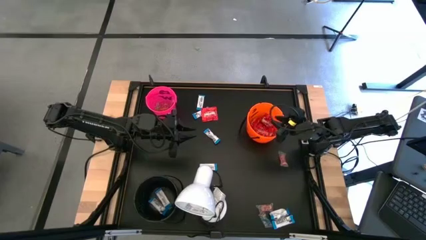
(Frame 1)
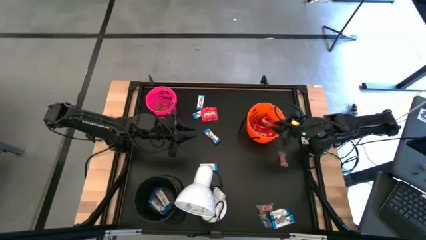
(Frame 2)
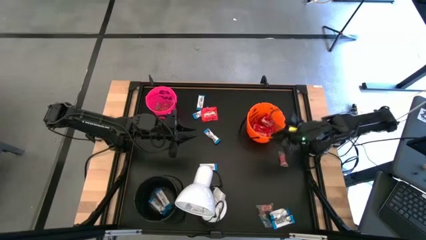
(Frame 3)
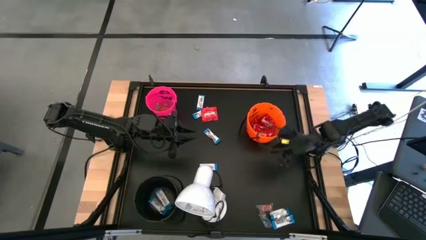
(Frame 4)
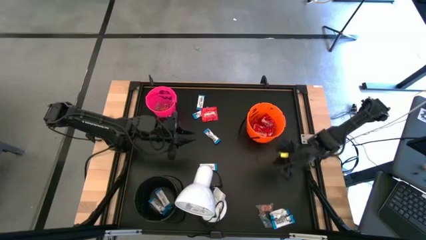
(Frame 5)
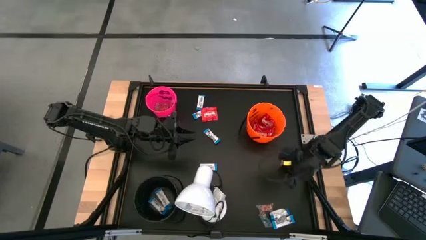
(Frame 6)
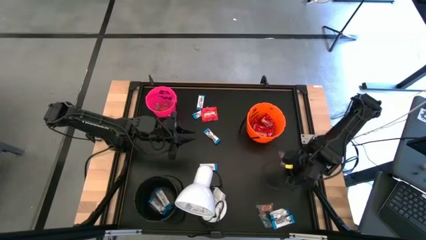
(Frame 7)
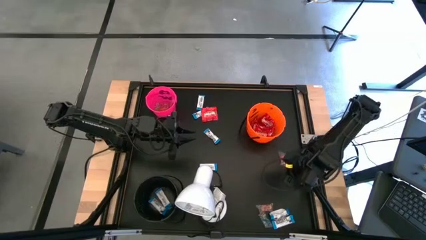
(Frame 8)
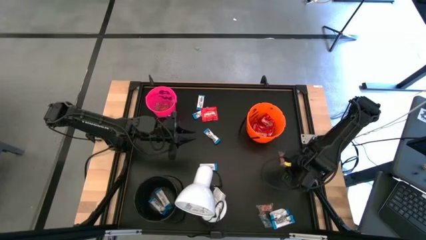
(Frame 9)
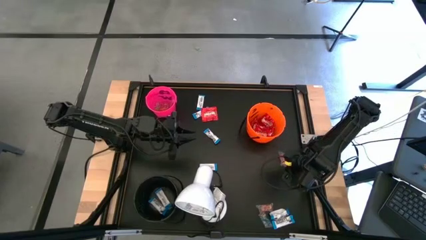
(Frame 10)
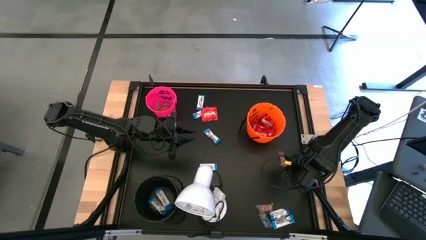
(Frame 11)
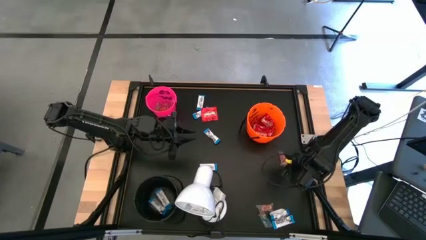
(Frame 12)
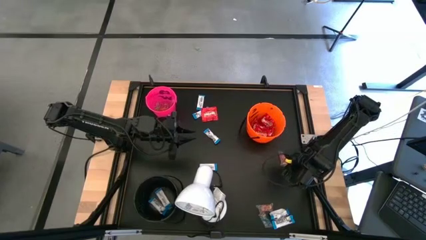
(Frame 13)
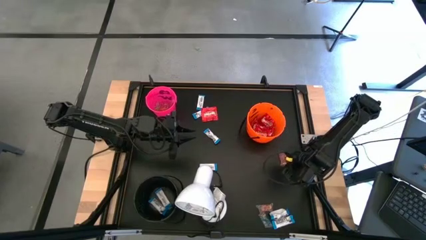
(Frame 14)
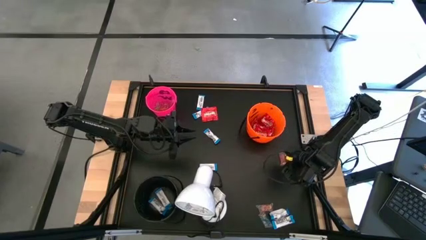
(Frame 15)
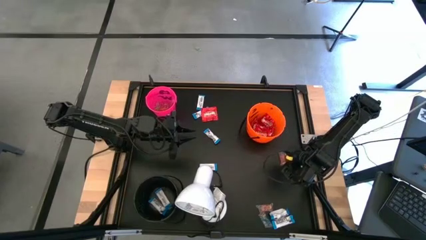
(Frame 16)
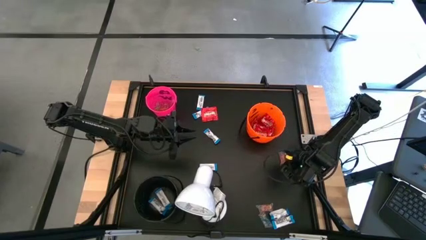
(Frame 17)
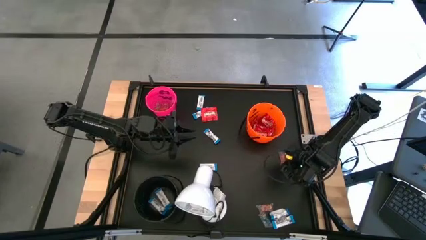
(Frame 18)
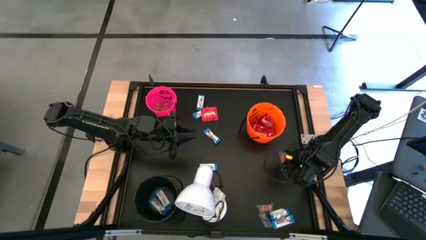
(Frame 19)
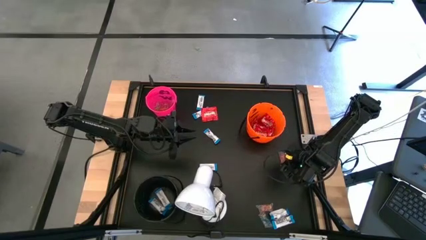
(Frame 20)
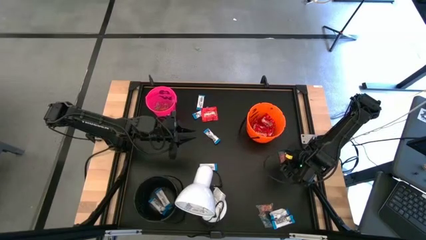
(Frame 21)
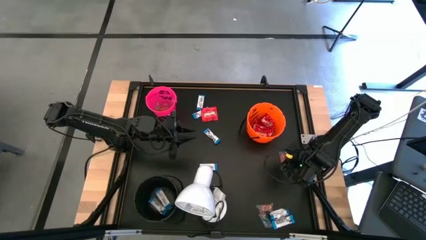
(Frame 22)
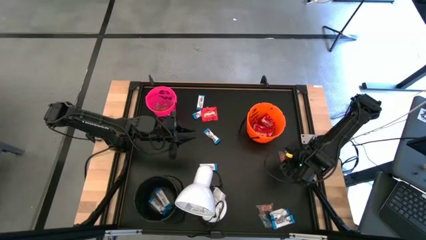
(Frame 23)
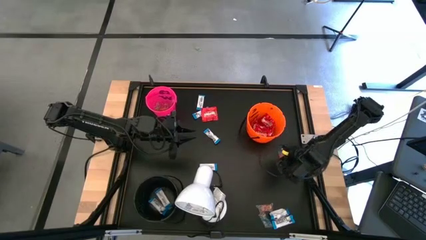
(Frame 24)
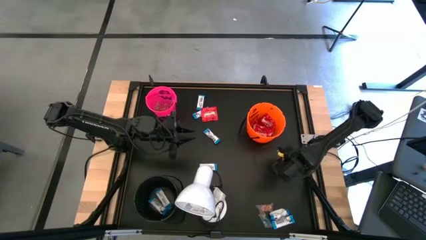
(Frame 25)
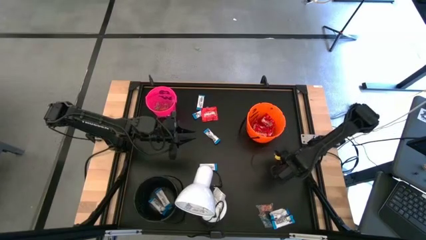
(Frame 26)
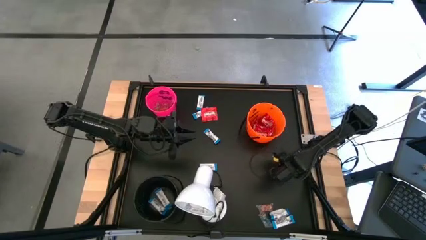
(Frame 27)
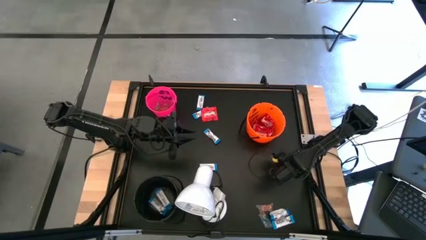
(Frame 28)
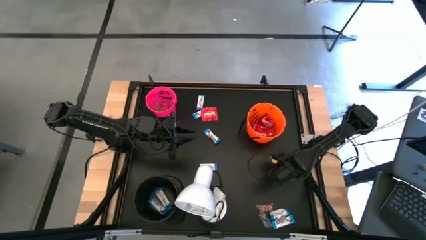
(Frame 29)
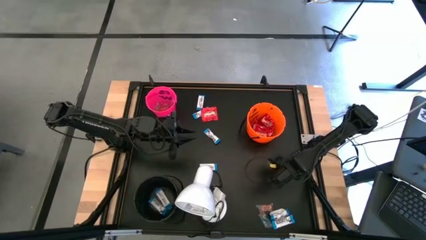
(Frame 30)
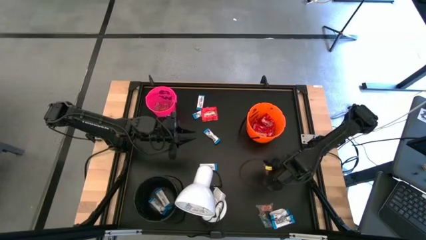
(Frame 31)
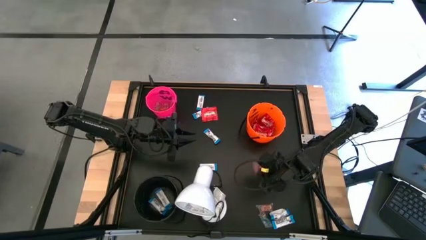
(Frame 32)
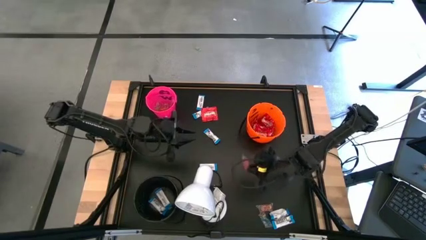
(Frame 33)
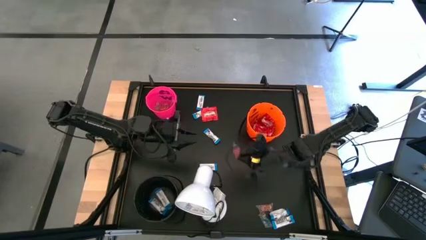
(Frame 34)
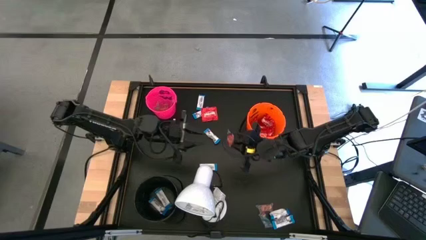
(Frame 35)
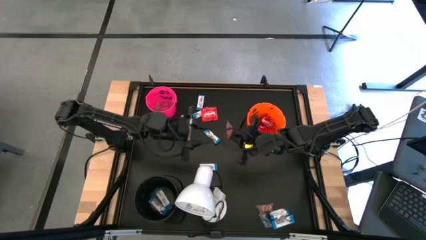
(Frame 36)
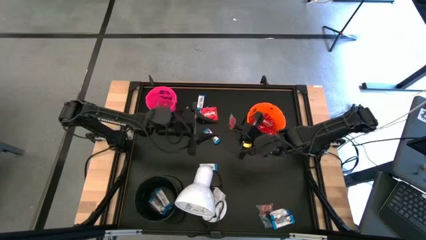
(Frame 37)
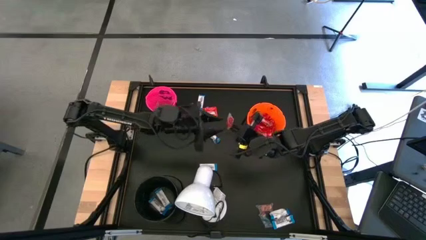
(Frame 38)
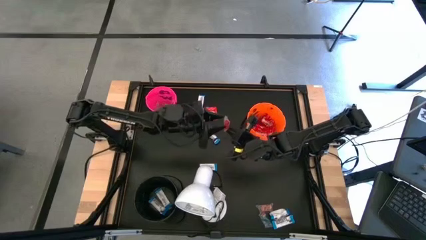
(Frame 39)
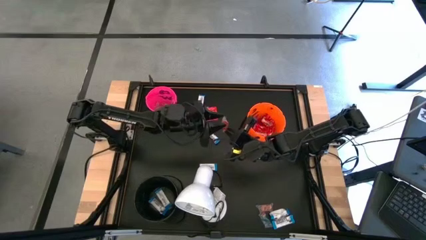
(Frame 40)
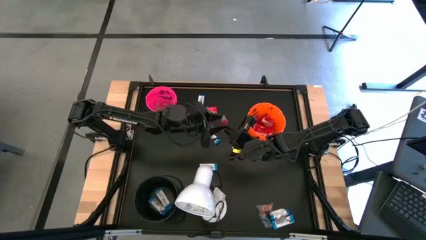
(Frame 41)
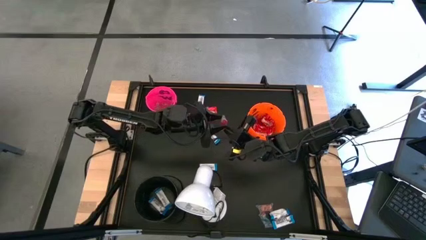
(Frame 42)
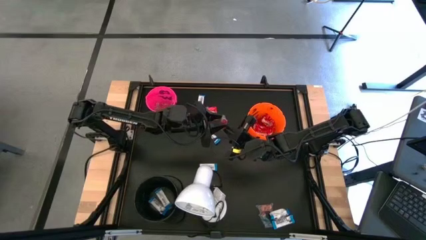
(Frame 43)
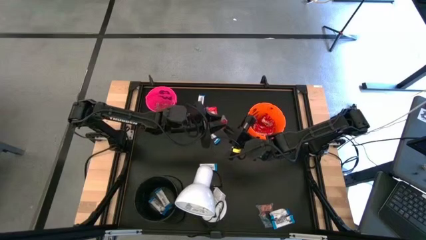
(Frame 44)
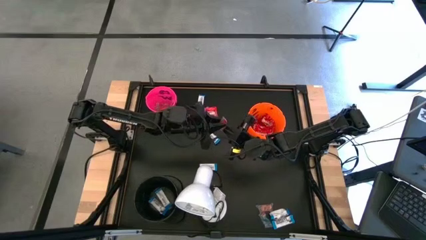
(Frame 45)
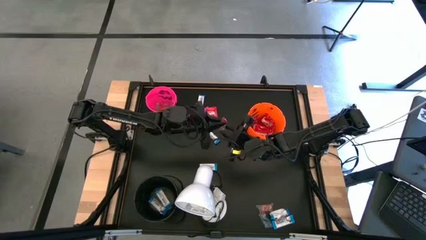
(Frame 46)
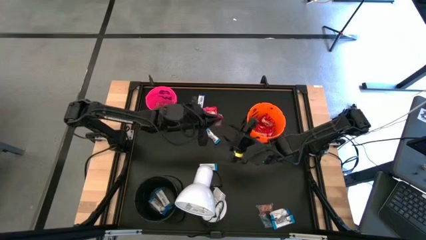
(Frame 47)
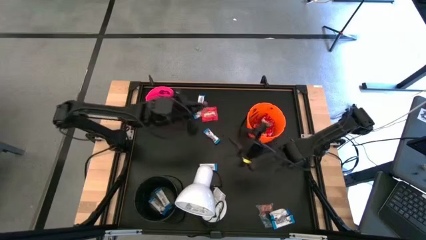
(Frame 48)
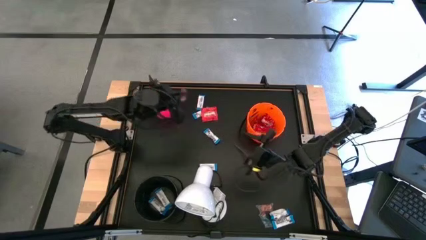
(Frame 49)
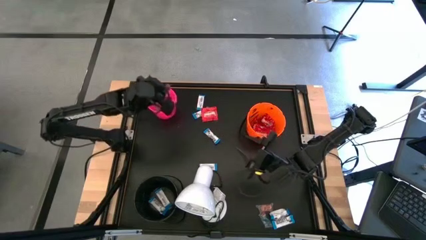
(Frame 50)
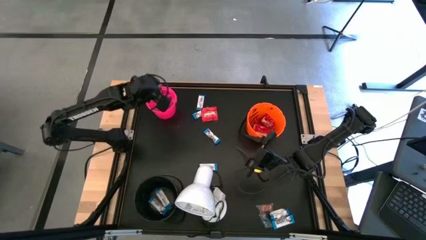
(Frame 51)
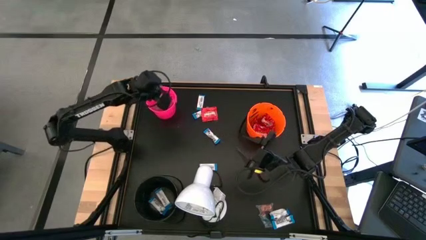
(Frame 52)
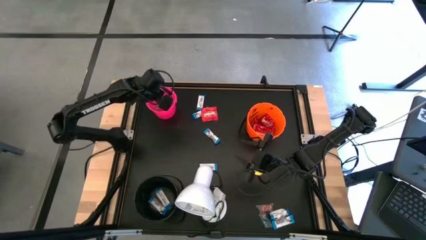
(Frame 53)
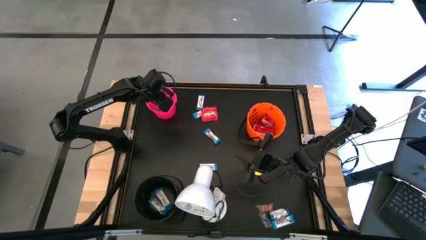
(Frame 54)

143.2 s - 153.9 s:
Task: Sort candy
Put the orange gummy into the pink bucket

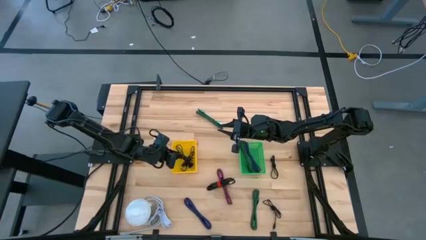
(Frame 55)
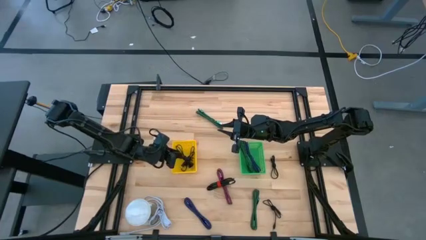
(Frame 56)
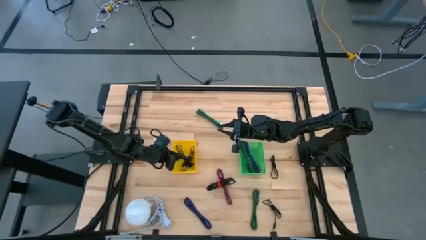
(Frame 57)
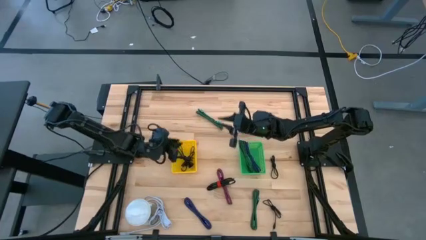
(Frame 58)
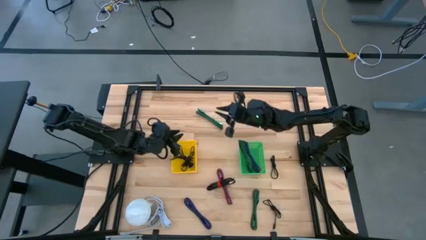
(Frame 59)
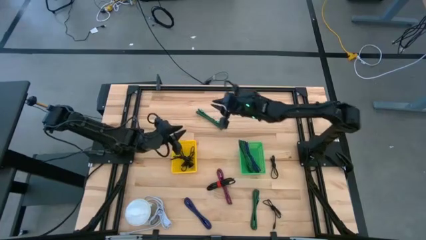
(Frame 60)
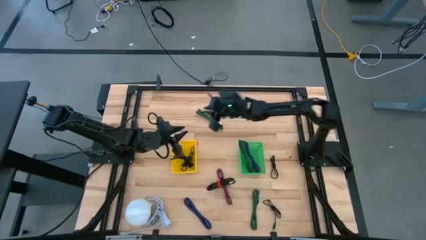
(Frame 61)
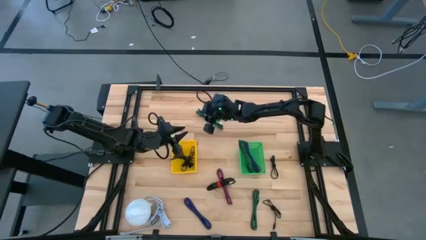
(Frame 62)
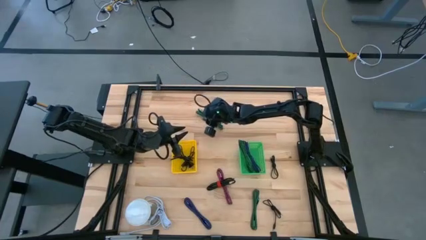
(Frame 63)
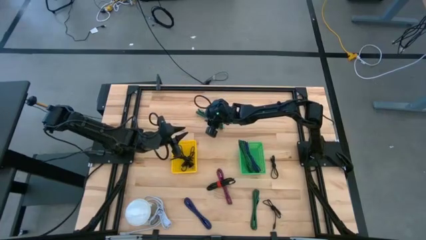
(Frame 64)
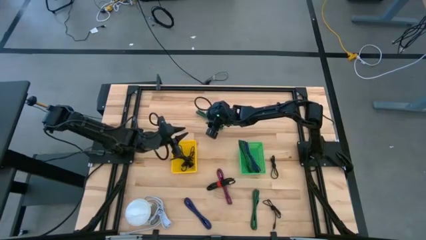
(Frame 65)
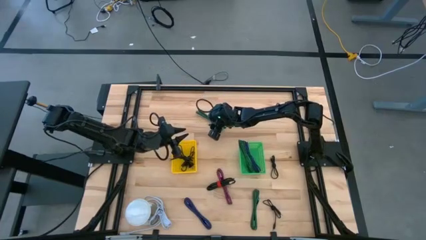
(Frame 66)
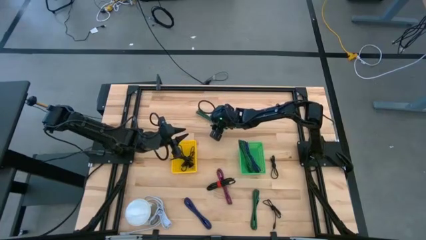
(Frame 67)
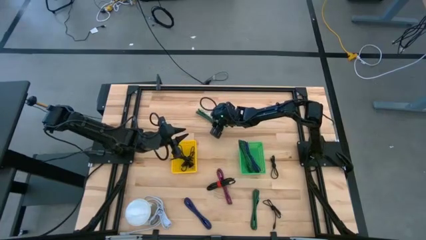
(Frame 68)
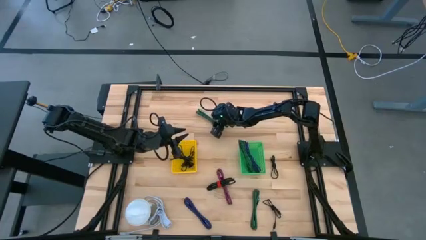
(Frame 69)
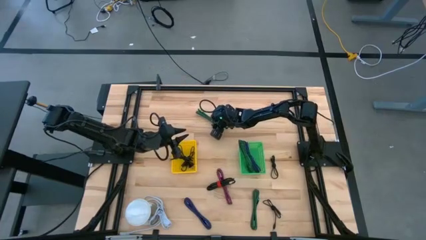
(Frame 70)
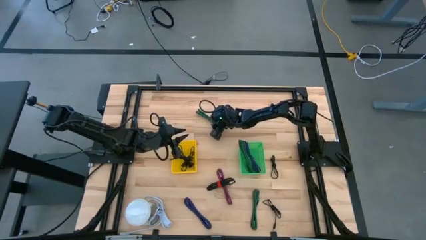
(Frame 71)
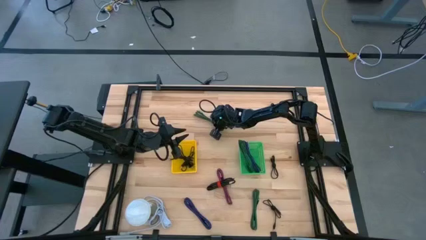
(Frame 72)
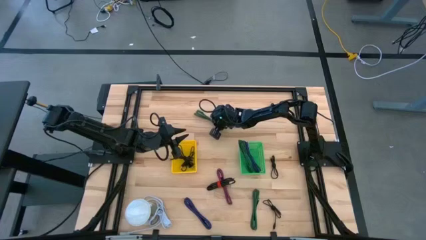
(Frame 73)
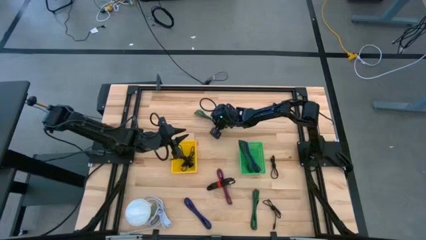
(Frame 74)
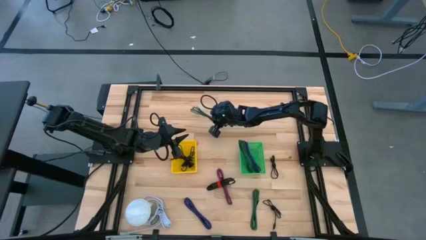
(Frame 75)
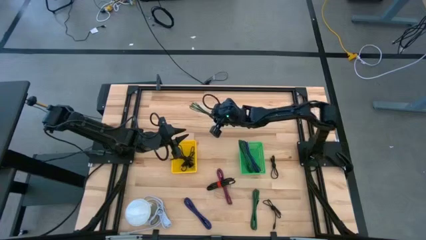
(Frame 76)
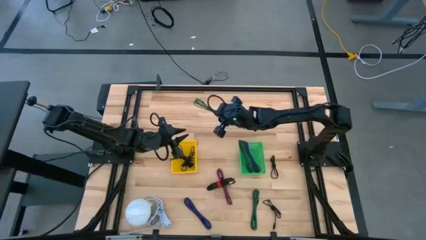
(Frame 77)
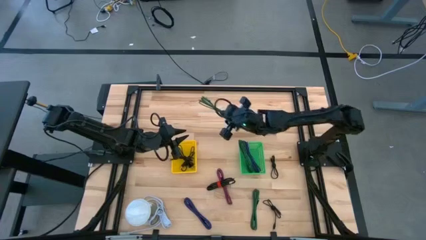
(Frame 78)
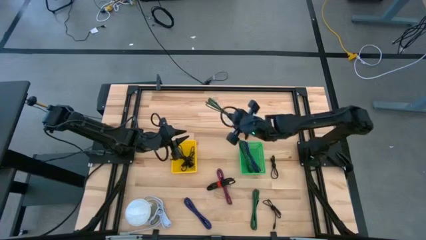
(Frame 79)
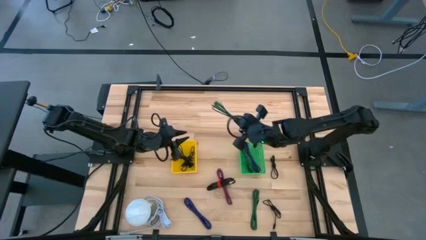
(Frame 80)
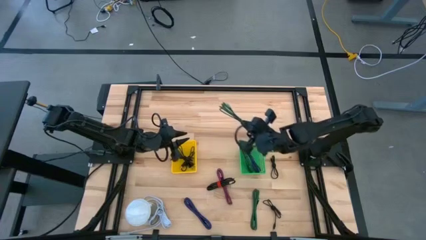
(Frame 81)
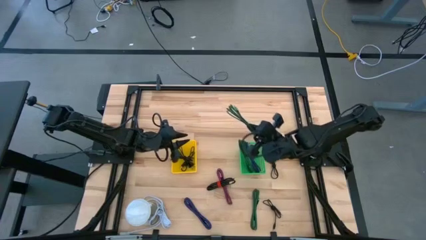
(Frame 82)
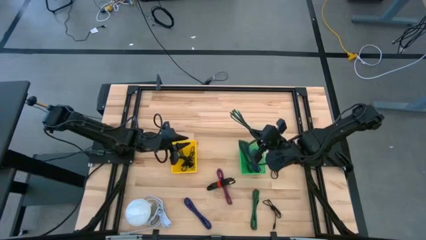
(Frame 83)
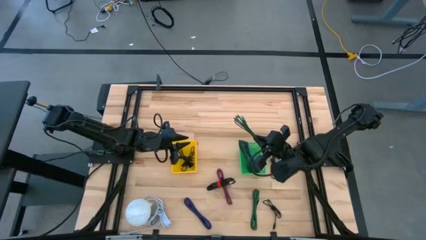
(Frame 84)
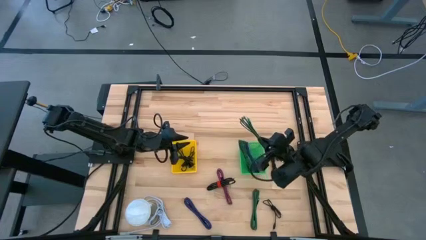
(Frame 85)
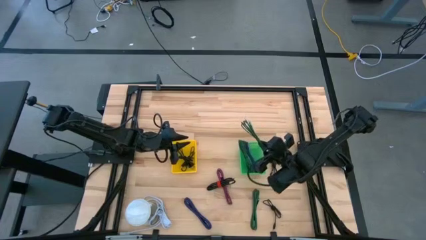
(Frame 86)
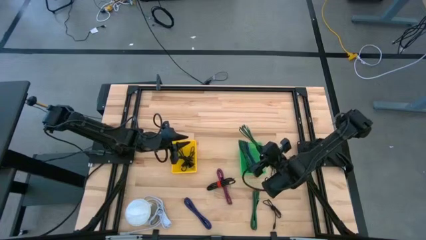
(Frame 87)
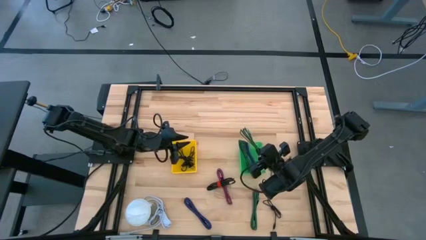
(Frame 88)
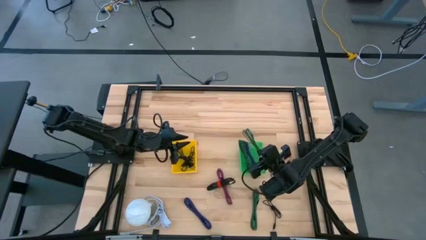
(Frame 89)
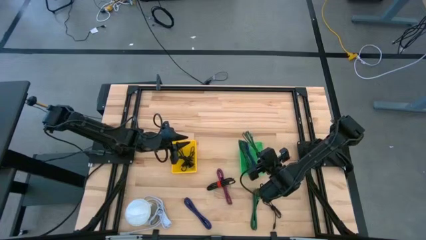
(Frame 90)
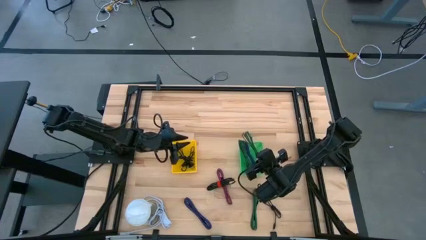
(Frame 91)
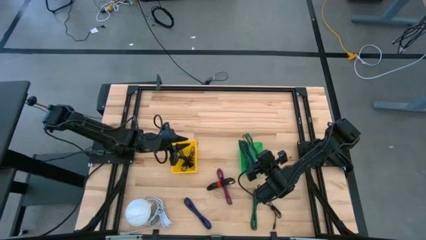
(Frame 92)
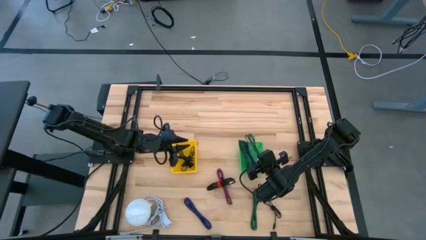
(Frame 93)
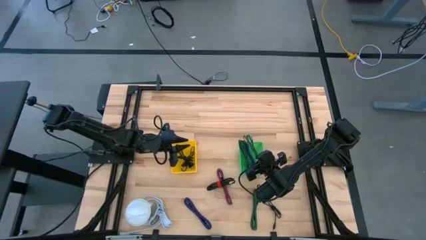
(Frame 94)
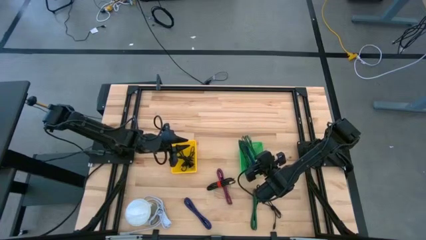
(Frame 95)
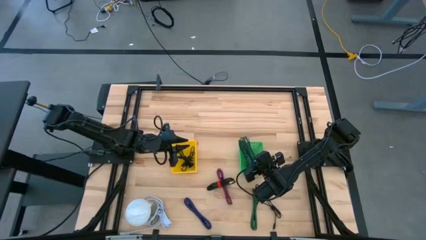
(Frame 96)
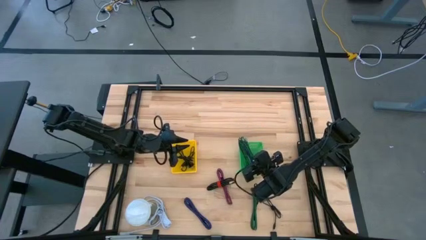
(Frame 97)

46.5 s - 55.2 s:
Task: Pick & Place USB Port
Put the black green charger cable into the green bin
